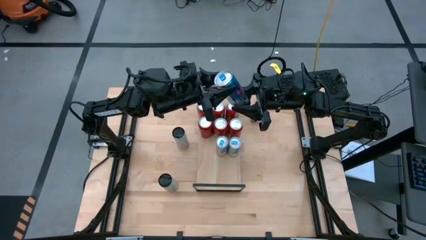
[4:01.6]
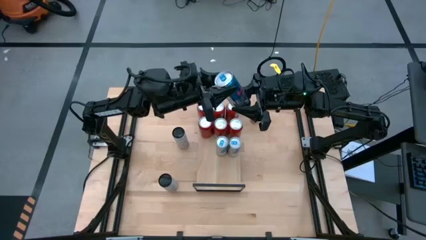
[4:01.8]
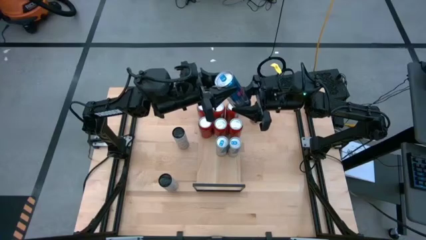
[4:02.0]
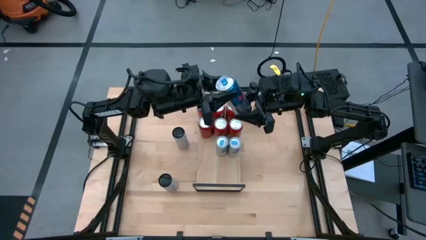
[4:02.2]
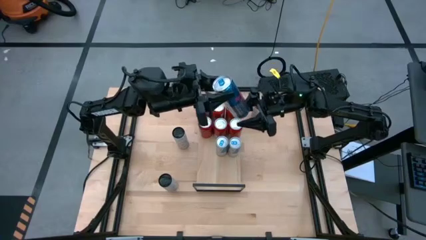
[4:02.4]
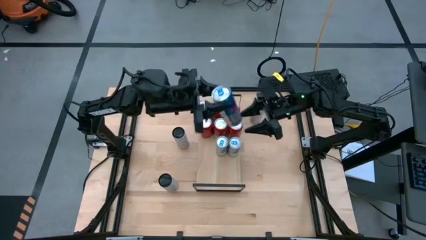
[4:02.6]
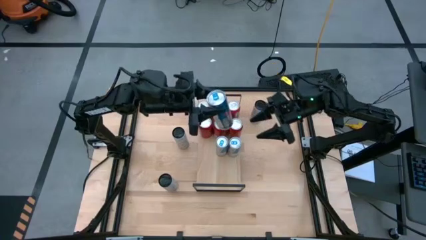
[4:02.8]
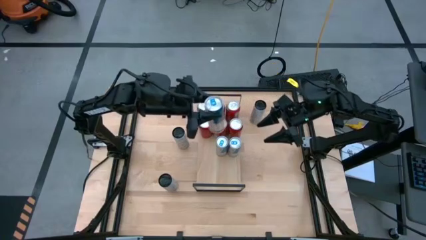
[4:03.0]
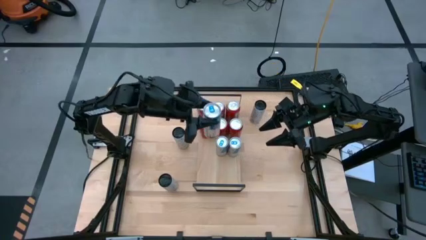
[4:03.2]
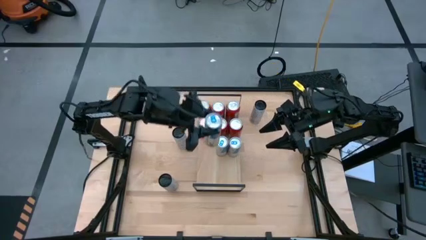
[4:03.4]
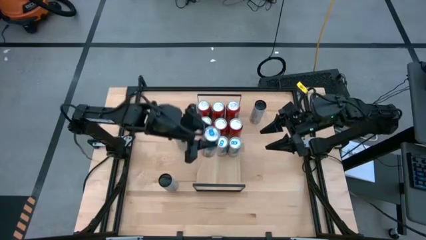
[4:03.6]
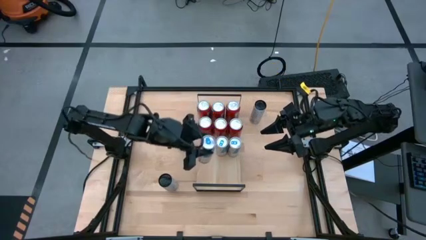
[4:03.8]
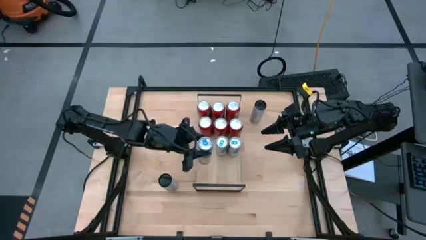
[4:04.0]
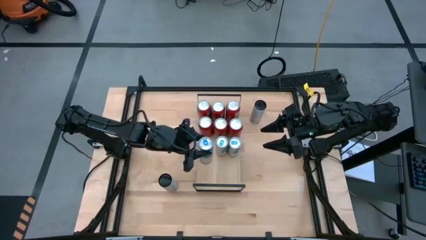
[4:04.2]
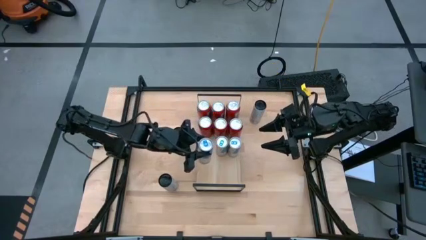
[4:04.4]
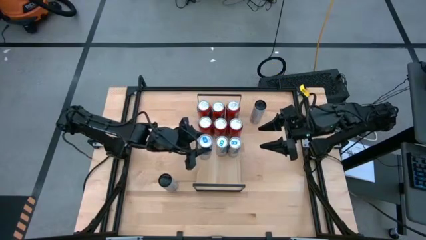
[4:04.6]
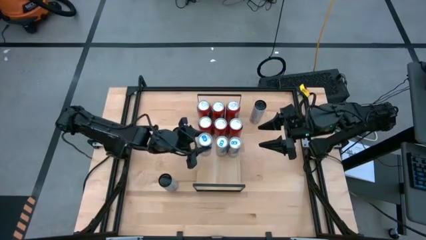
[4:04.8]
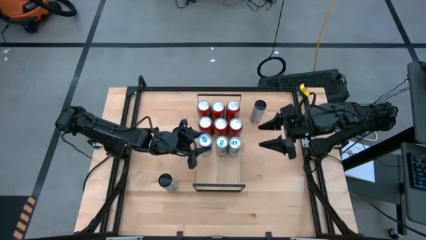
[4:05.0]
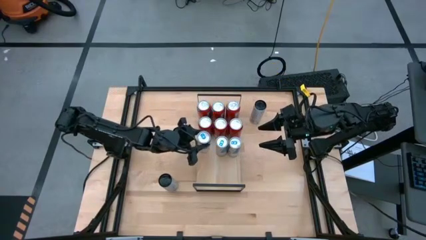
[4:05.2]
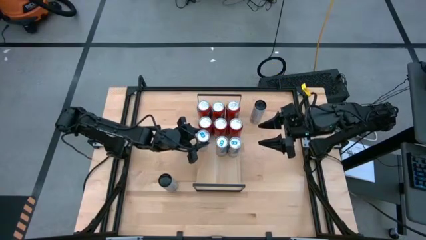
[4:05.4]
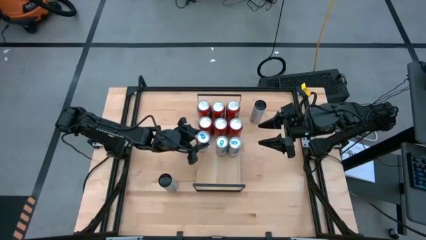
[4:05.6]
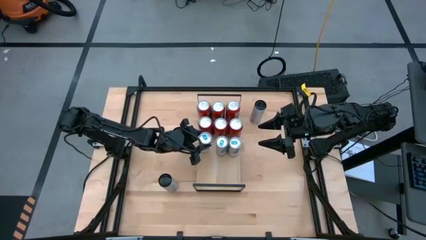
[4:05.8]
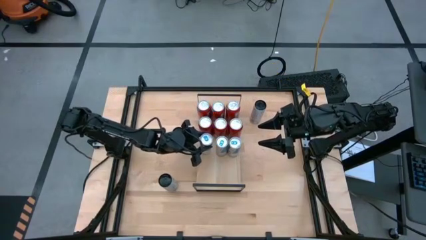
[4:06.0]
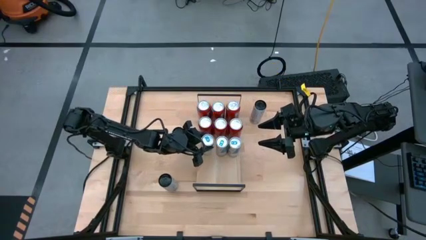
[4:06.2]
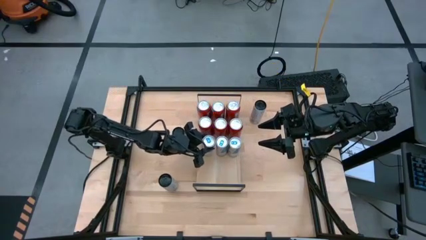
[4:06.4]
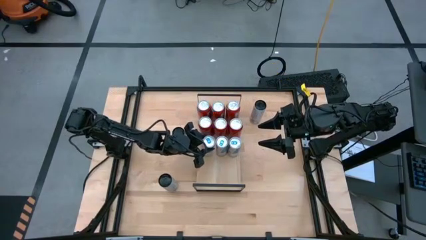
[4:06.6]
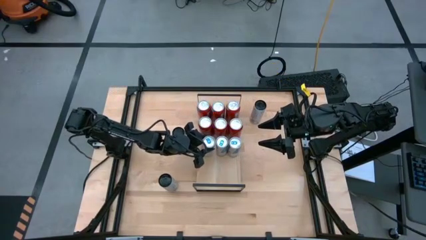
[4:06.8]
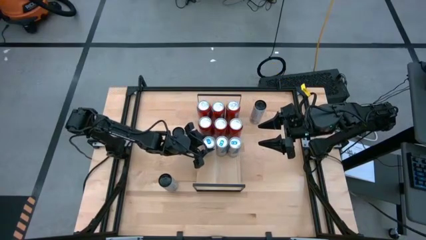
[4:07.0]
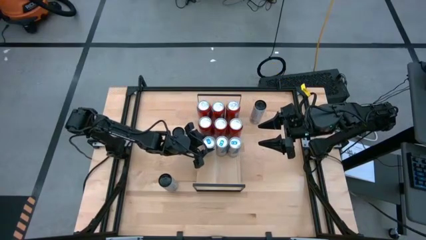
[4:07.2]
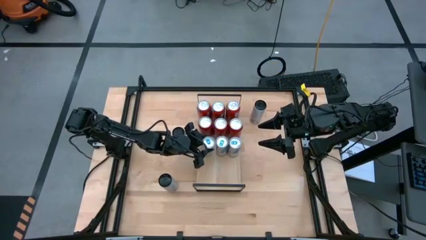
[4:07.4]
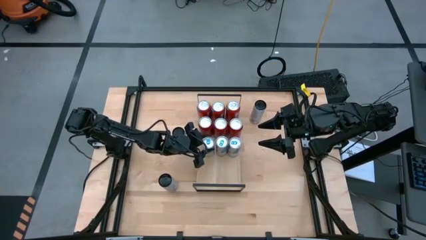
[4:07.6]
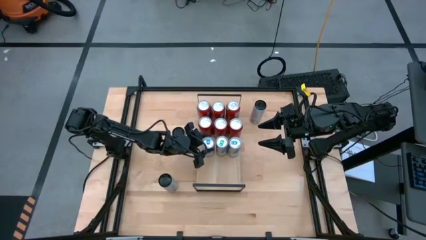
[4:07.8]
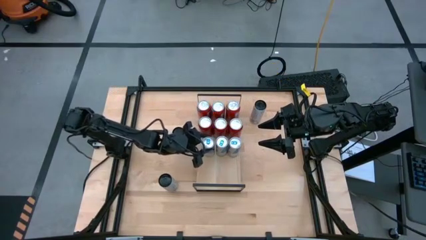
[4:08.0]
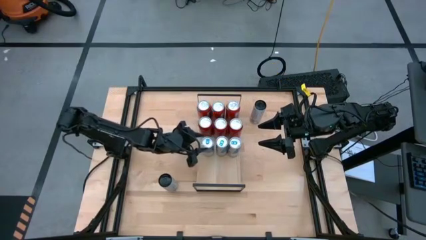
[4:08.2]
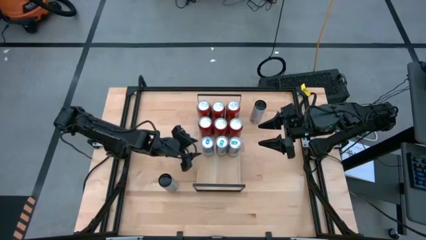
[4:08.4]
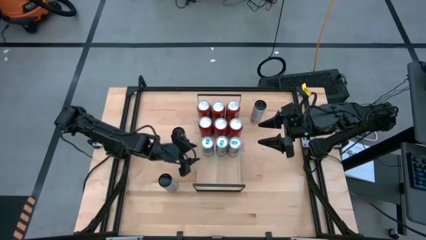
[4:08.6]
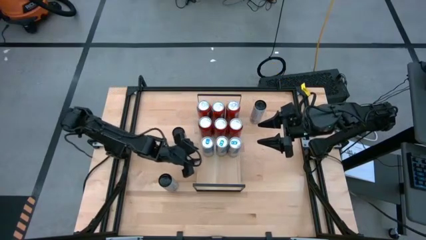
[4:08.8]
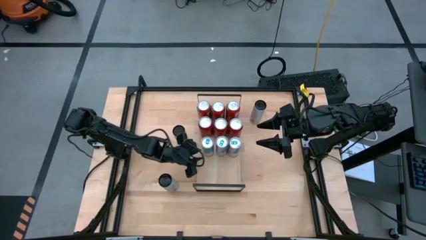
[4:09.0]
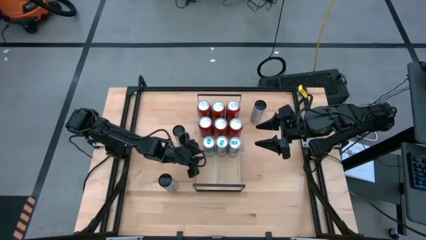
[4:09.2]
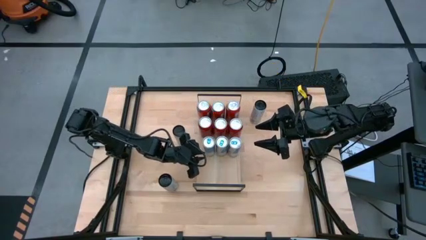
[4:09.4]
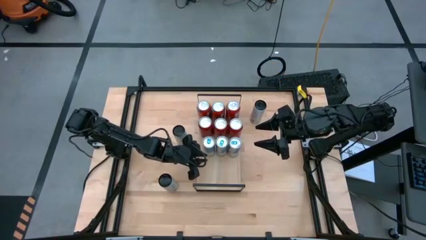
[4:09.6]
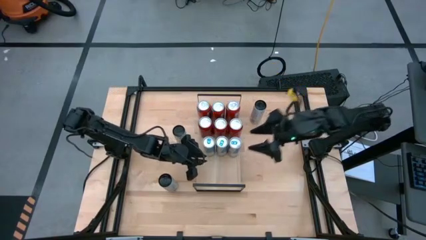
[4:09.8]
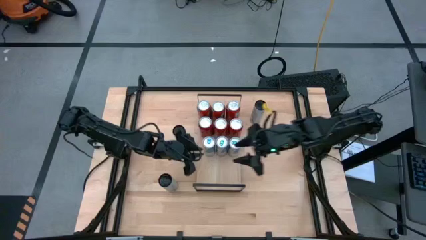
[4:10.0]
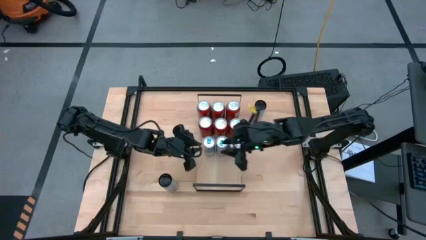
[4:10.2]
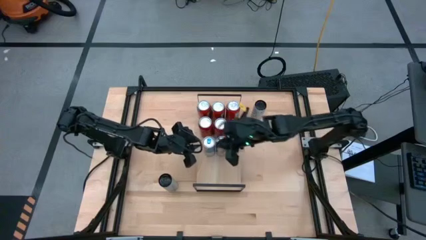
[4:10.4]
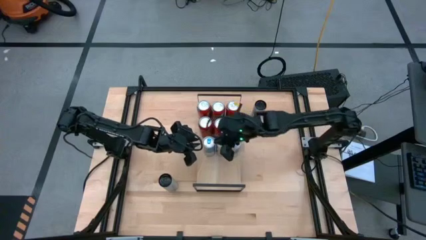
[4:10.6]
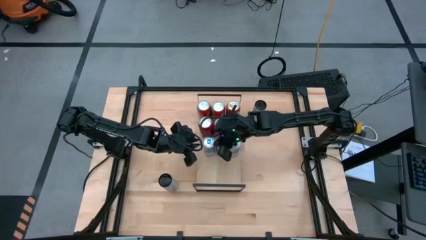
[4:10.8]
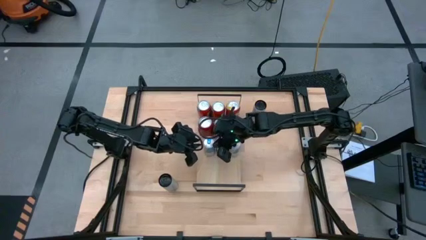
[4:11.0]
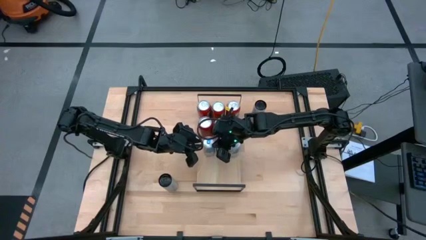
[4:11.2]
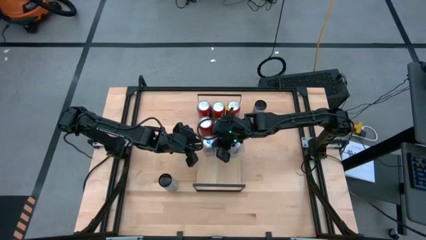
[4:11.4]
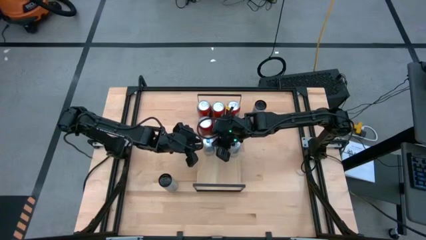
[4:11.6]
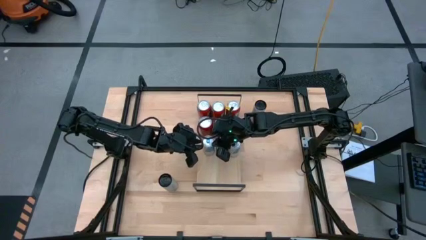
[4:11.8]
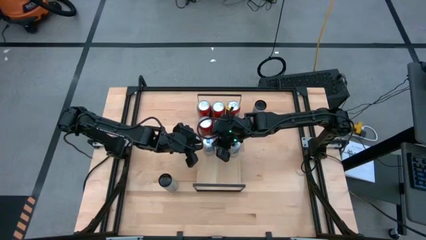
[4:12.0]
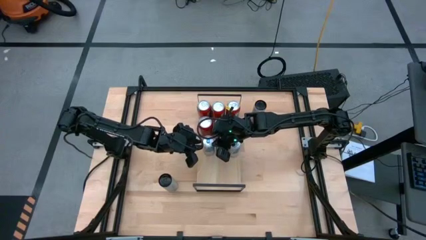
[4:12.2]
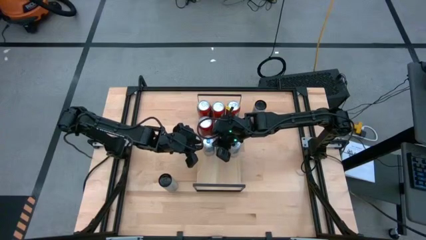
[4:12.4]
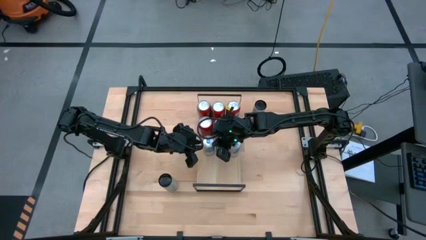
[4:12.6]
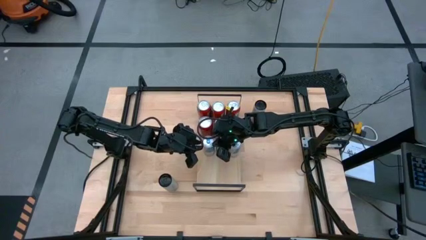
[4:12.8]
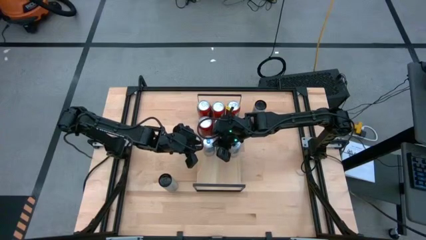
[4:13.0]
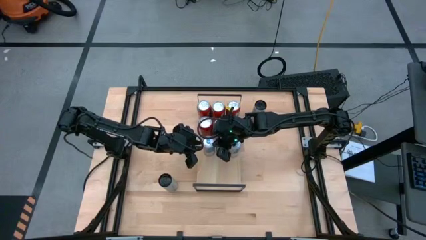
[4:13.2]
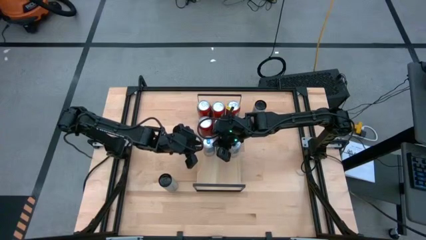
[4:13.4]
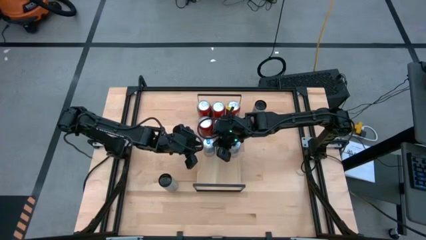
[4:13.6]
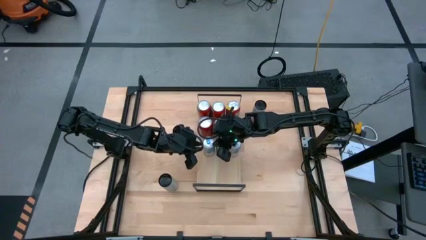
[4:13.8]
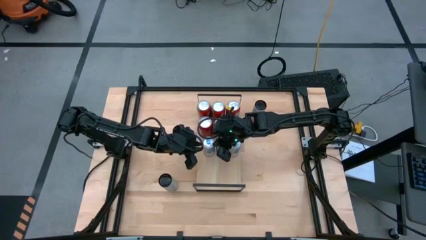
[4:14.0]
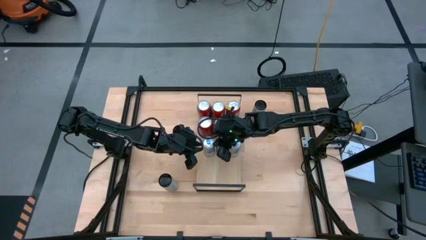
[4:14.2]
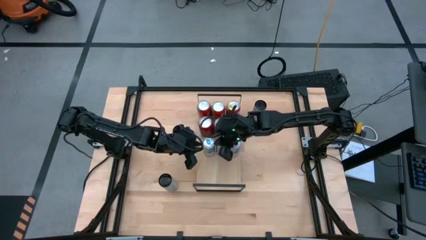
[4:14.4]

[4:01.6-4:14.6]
Task: Place canned beverage on shelf
Put the blue soda can on the shelf aligned with the other blue soda can

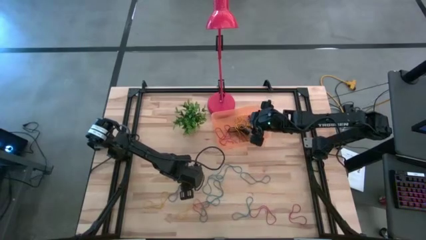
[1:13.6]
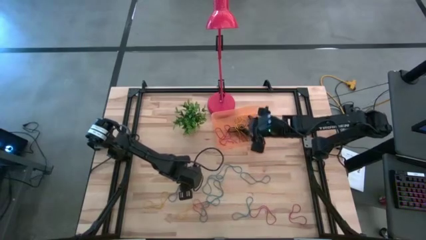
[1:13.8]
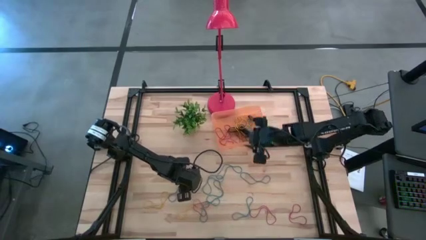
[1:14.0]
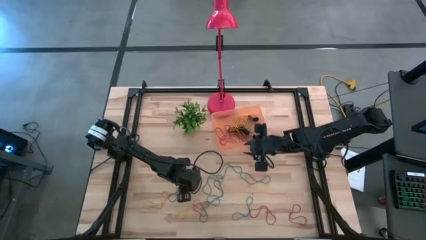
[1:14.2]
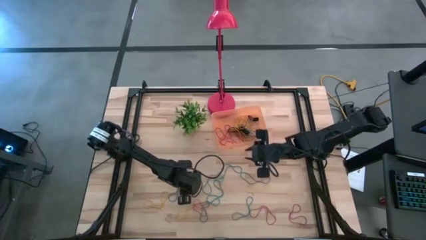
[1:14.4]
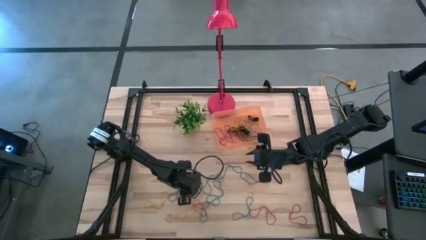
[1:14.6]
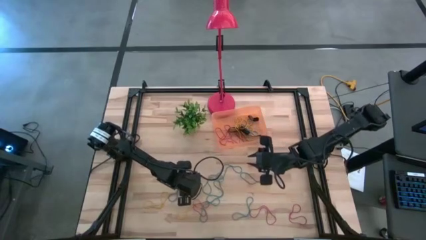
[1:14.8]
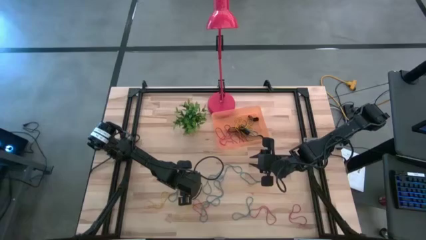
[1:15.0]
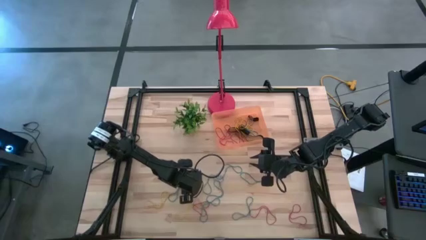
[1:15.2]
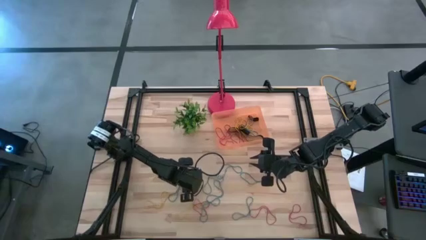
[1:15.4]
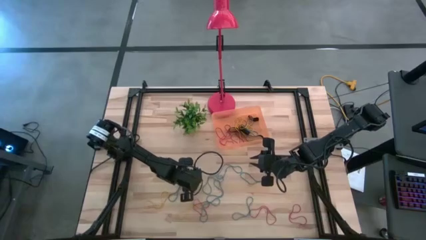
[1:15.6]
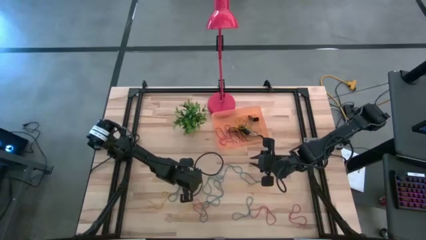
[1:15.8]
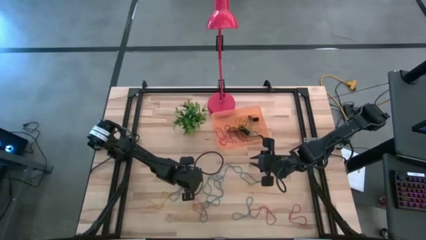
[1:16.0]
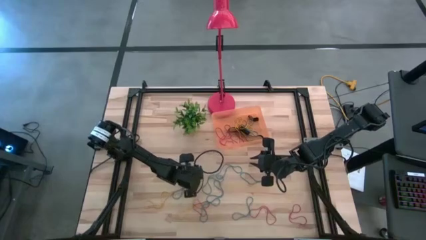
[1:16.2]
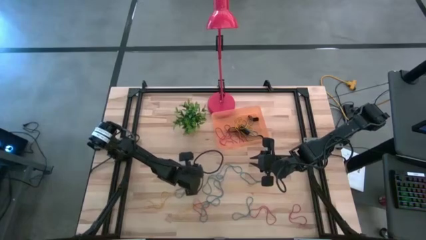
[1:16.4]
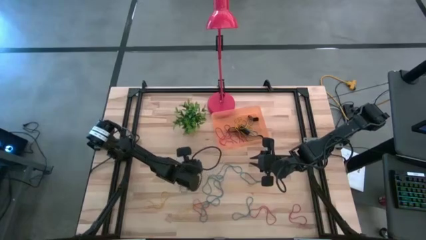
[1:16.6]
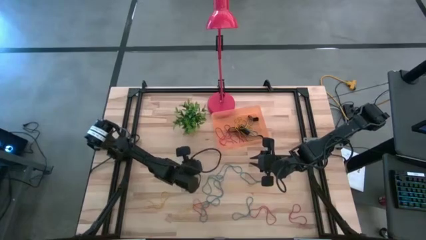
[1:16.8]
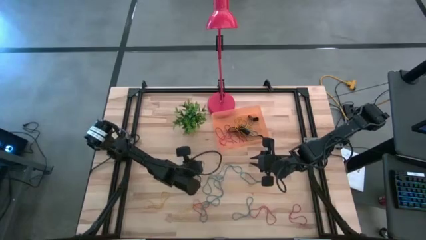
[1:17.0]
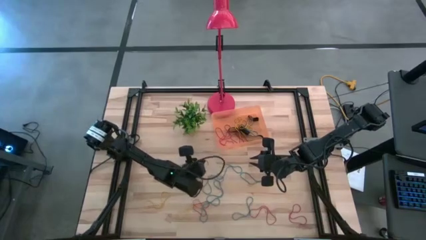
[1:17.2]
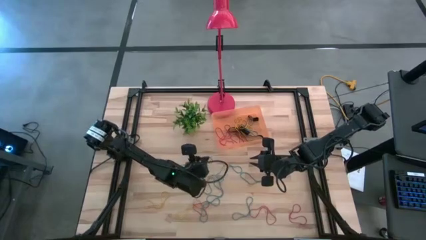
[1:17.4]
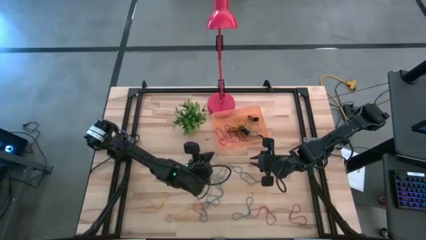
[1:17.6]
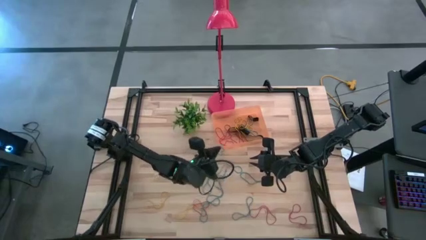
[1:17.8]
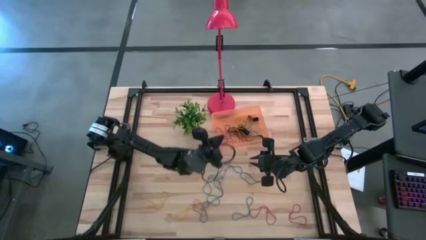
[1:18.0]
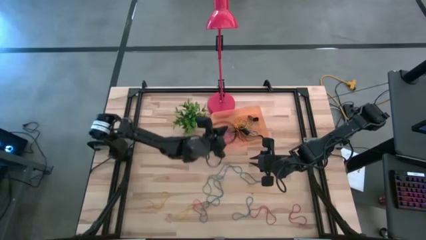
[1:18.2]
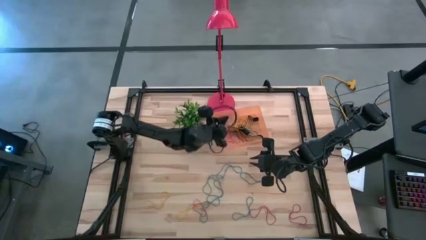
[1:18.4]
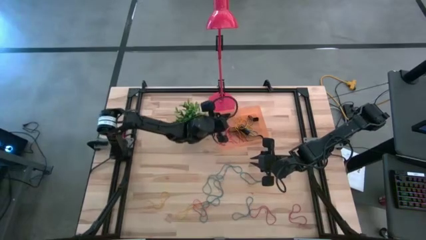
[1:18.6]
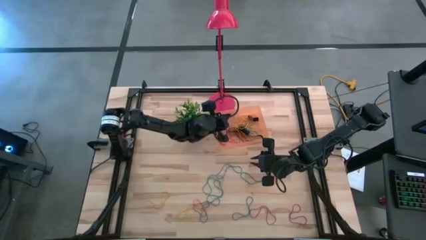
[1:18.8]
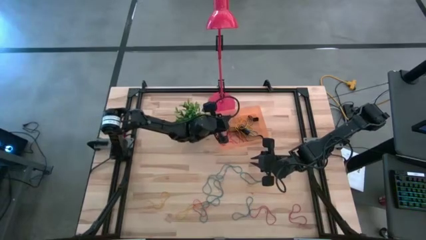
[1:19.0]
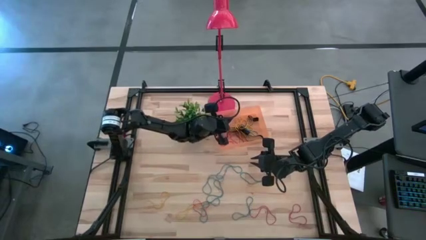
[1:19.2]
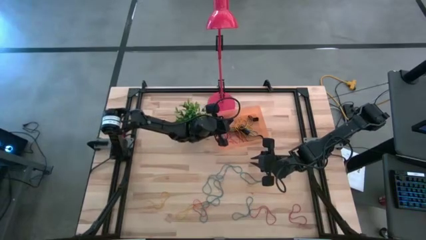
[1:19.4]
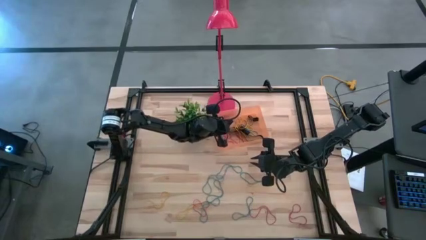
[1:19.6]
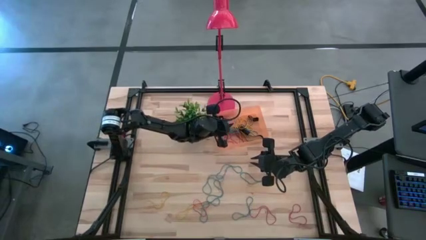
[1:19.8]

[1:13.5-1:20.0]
Task: Pick and place rubber bands into bin
Put the blue rubberband into the orange container
